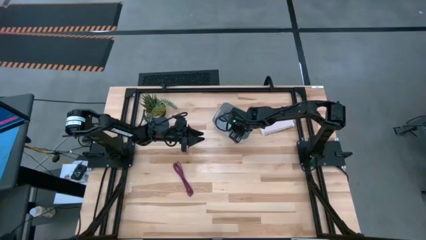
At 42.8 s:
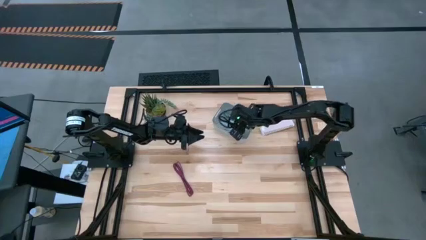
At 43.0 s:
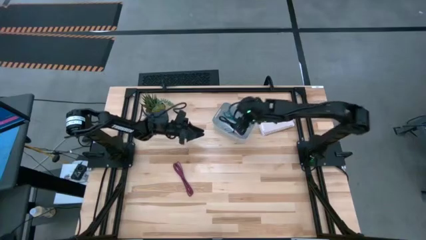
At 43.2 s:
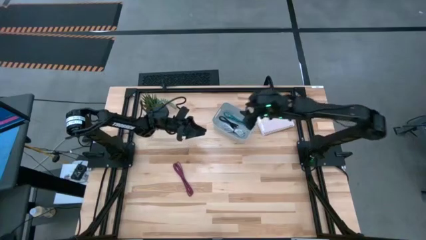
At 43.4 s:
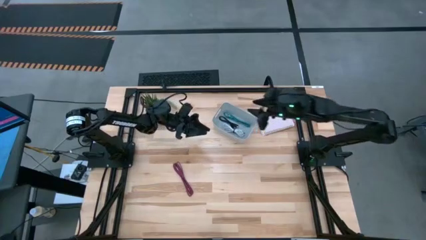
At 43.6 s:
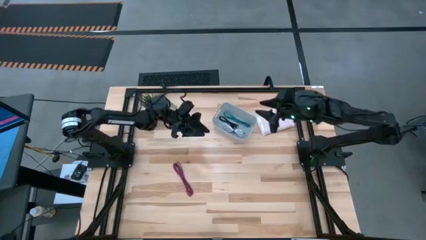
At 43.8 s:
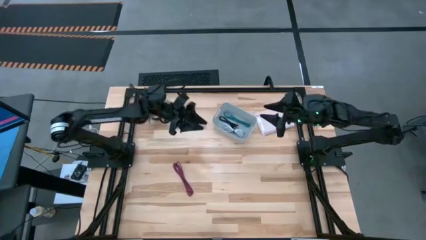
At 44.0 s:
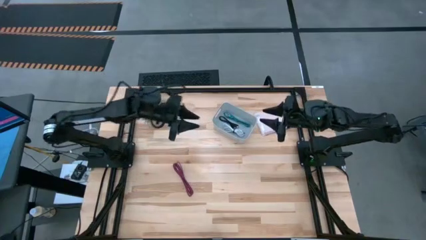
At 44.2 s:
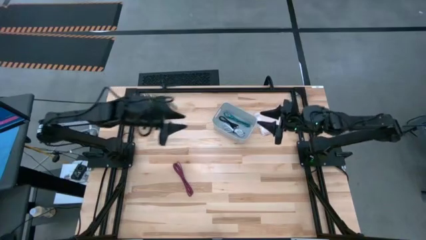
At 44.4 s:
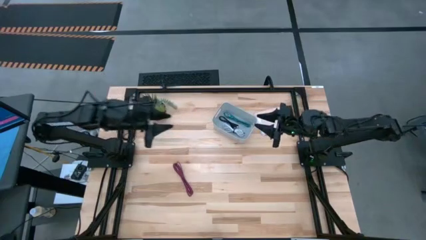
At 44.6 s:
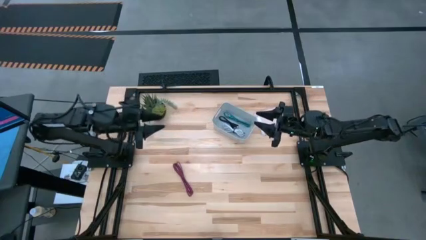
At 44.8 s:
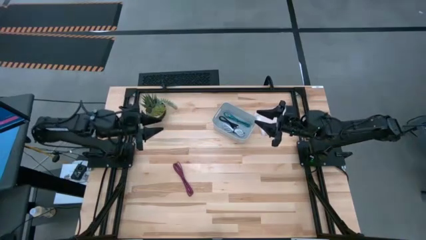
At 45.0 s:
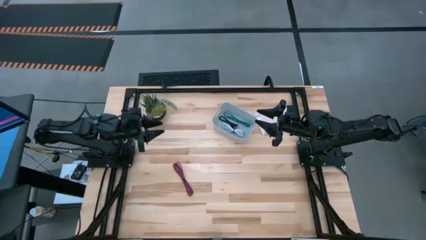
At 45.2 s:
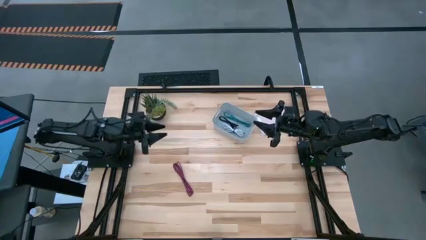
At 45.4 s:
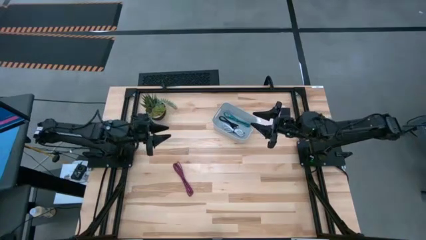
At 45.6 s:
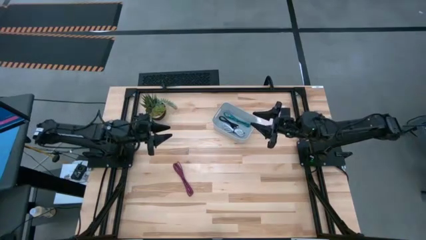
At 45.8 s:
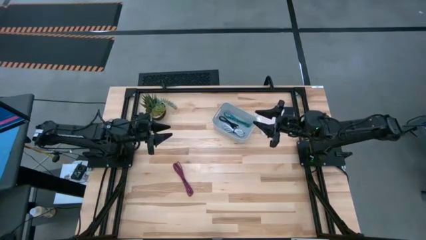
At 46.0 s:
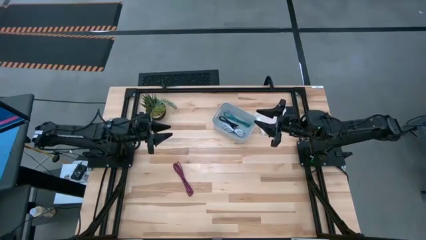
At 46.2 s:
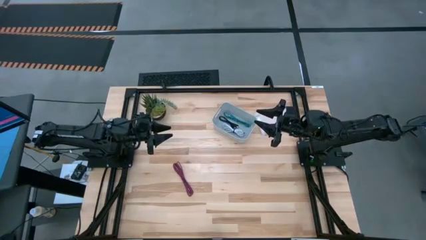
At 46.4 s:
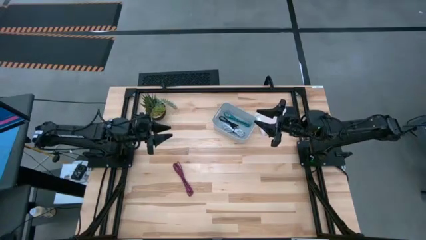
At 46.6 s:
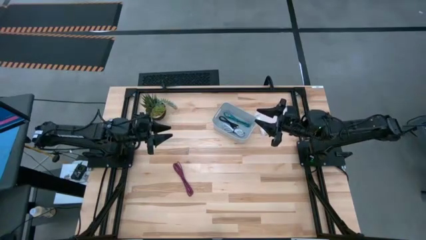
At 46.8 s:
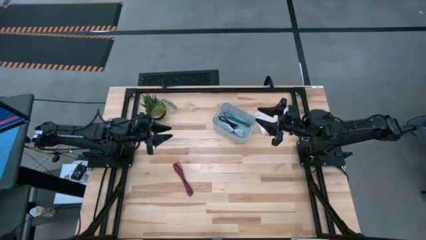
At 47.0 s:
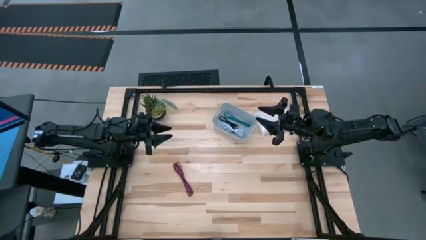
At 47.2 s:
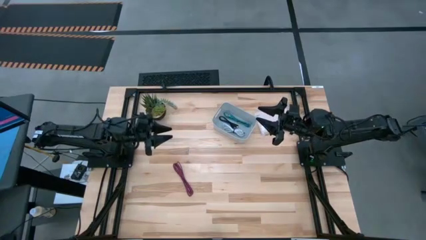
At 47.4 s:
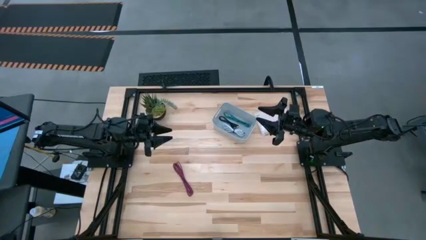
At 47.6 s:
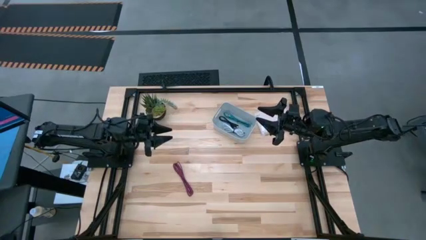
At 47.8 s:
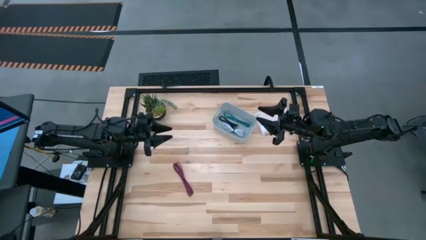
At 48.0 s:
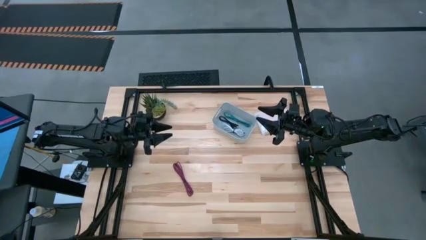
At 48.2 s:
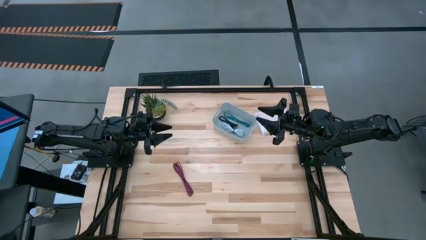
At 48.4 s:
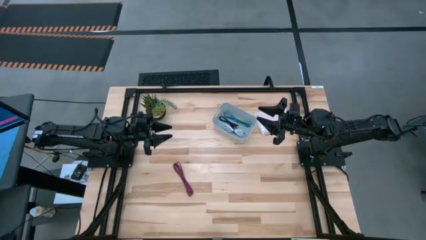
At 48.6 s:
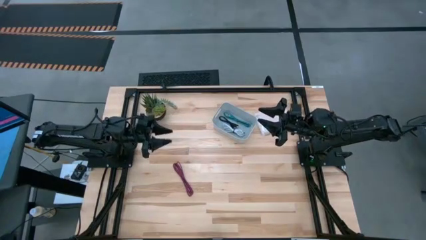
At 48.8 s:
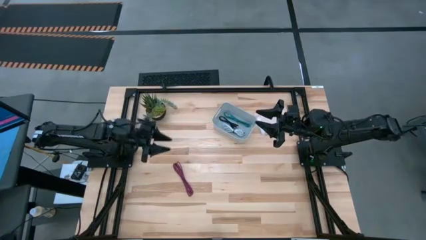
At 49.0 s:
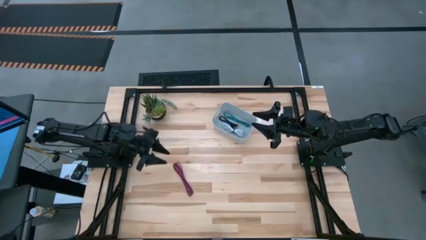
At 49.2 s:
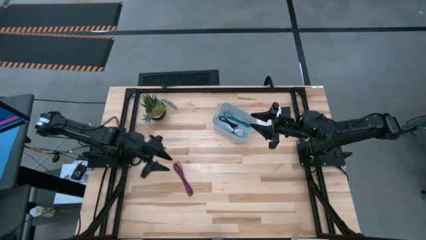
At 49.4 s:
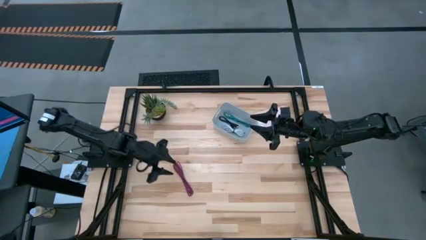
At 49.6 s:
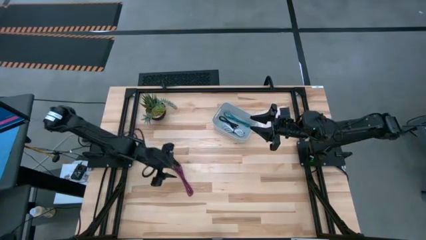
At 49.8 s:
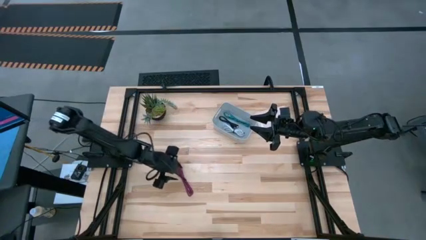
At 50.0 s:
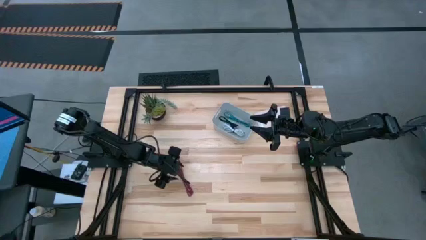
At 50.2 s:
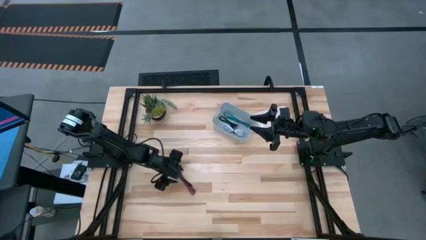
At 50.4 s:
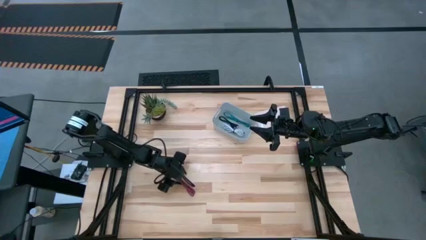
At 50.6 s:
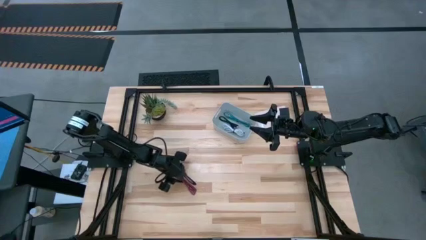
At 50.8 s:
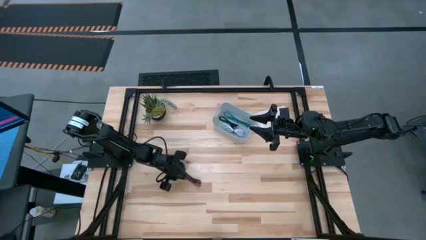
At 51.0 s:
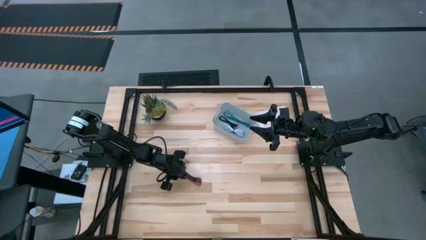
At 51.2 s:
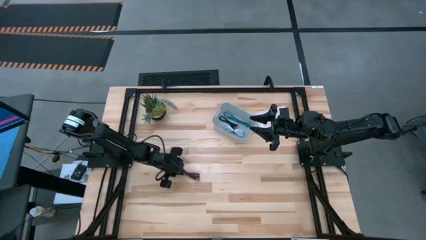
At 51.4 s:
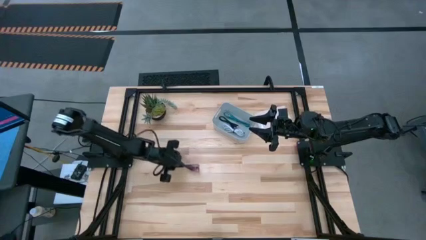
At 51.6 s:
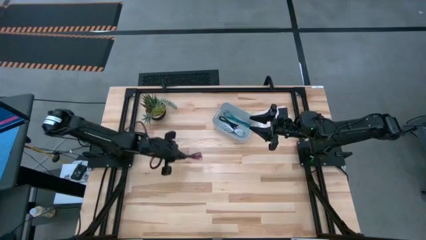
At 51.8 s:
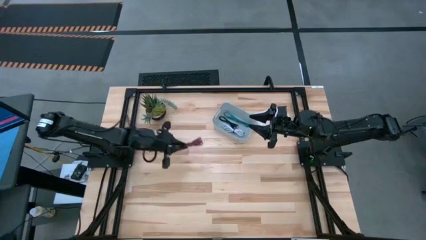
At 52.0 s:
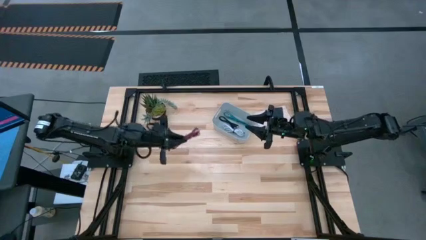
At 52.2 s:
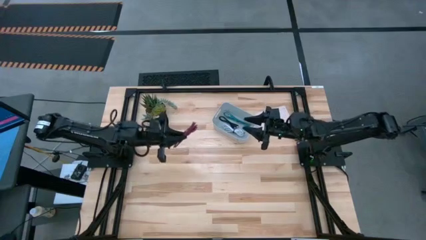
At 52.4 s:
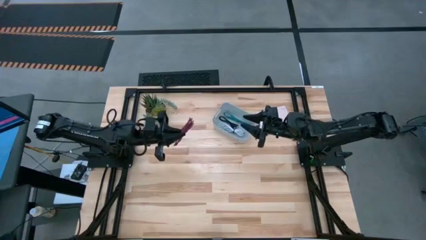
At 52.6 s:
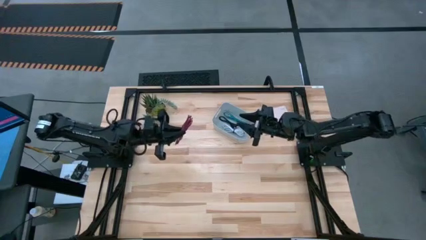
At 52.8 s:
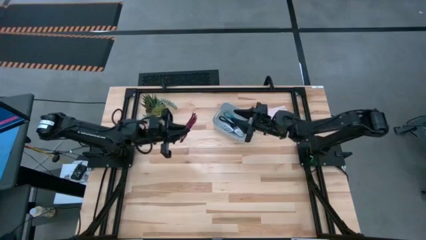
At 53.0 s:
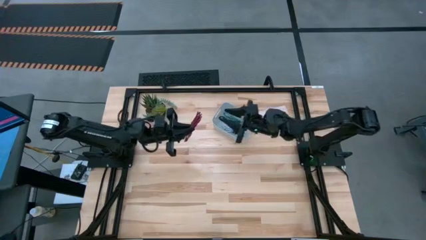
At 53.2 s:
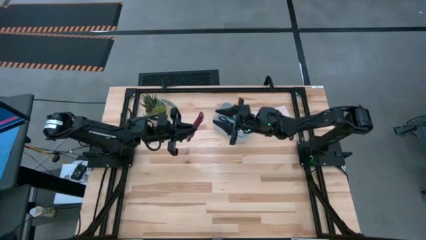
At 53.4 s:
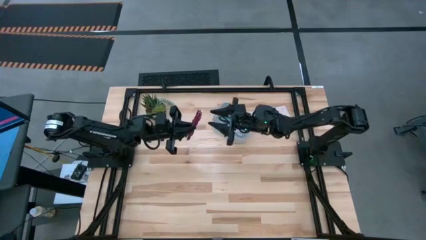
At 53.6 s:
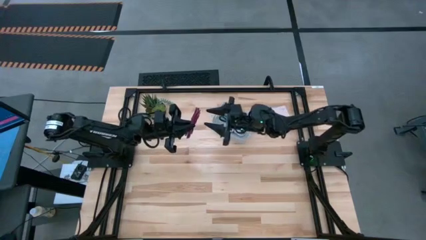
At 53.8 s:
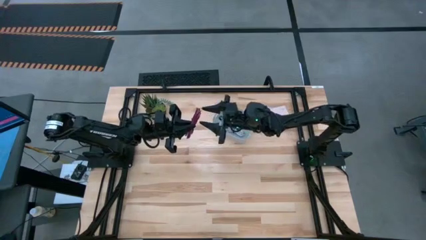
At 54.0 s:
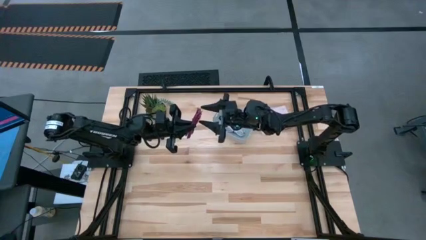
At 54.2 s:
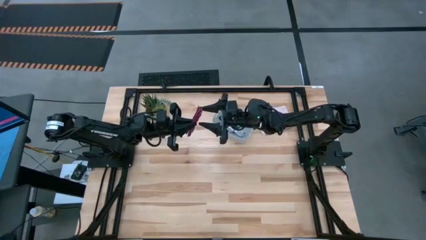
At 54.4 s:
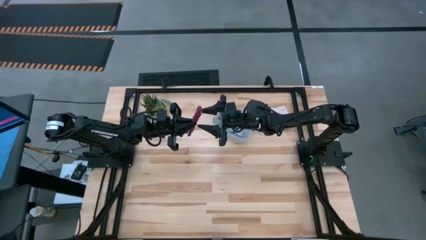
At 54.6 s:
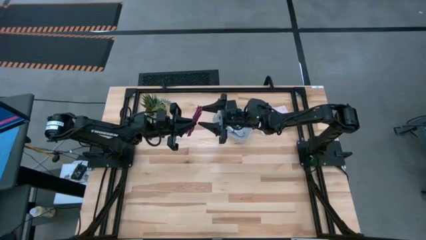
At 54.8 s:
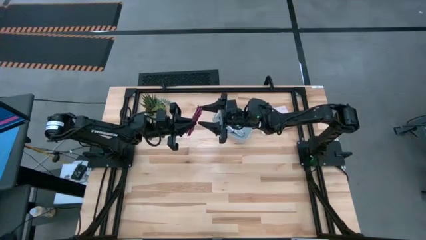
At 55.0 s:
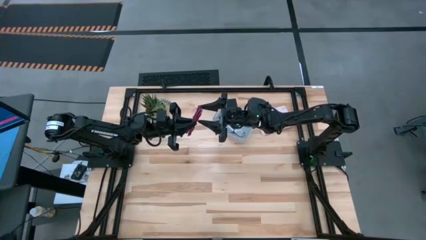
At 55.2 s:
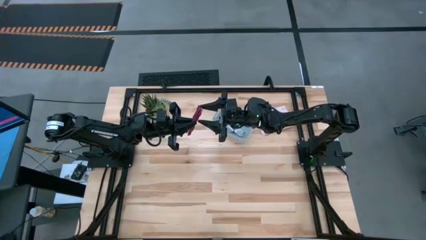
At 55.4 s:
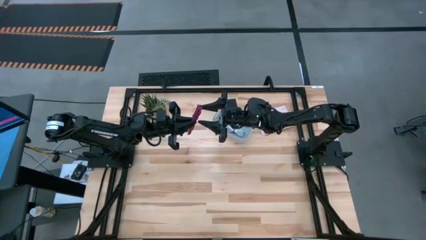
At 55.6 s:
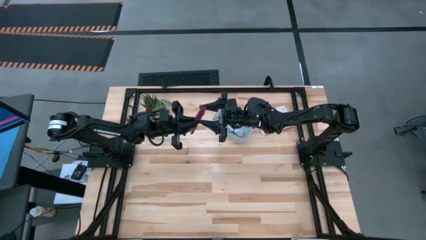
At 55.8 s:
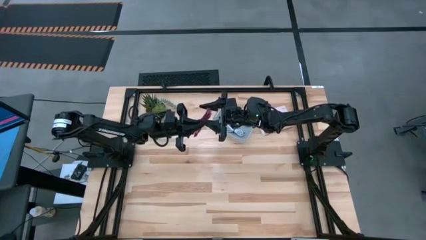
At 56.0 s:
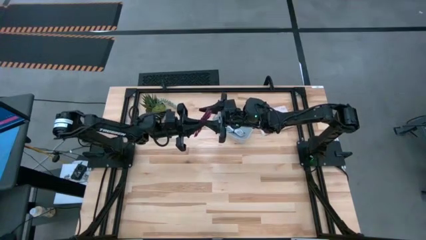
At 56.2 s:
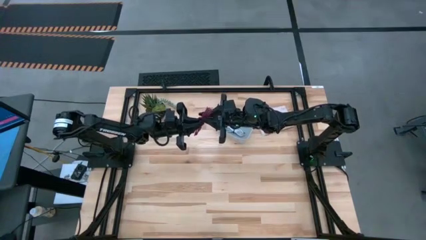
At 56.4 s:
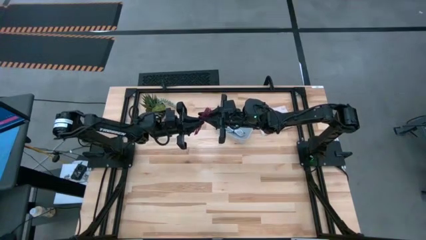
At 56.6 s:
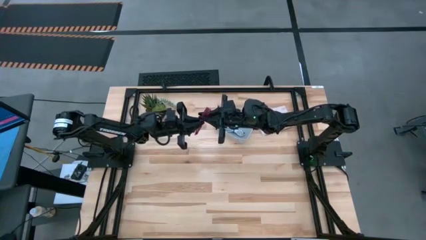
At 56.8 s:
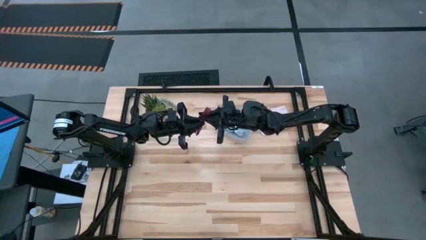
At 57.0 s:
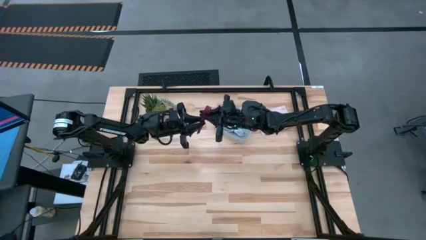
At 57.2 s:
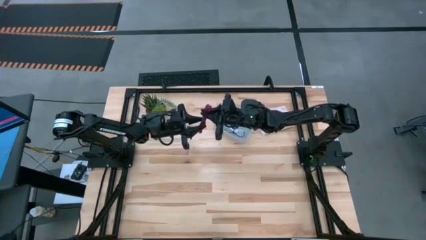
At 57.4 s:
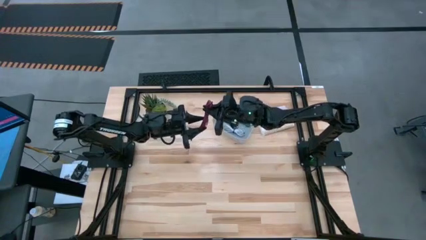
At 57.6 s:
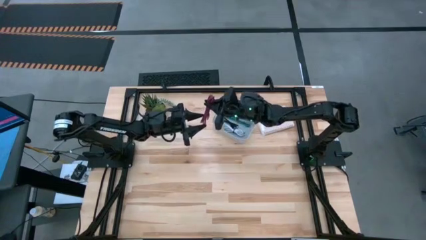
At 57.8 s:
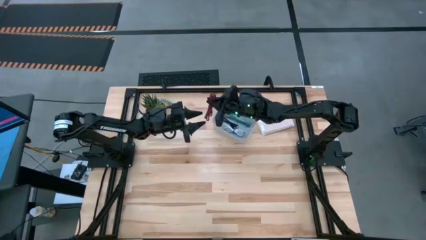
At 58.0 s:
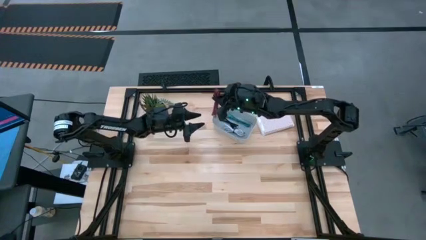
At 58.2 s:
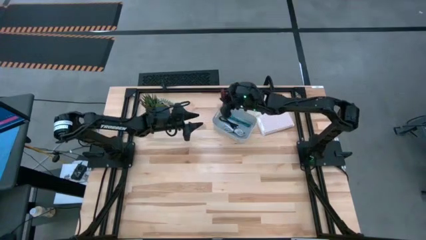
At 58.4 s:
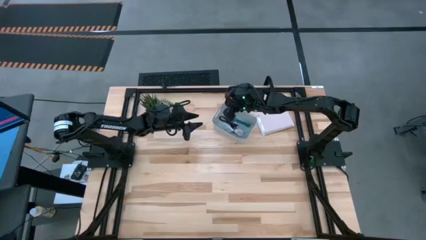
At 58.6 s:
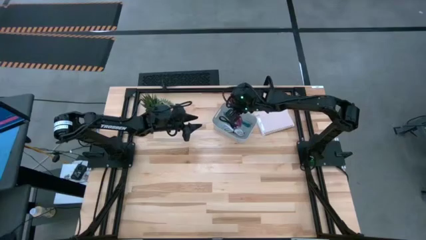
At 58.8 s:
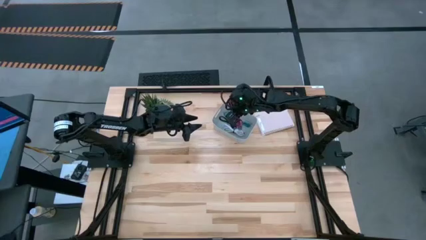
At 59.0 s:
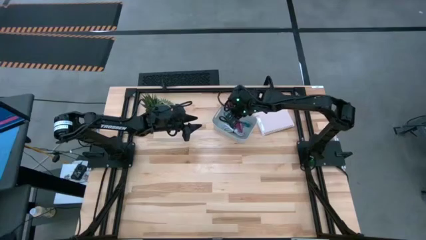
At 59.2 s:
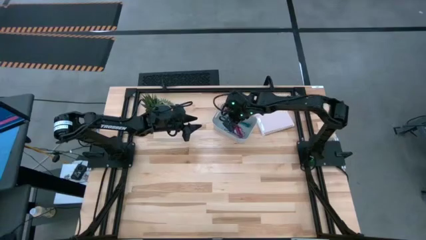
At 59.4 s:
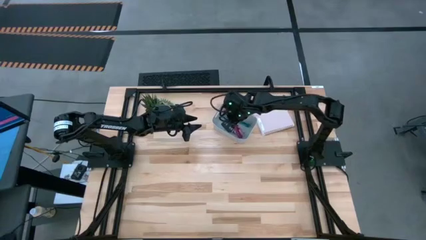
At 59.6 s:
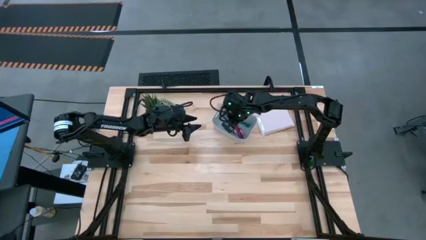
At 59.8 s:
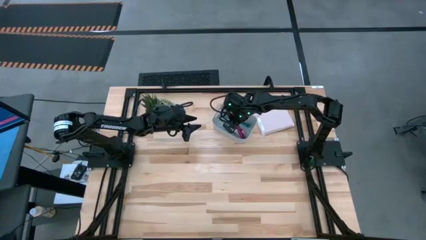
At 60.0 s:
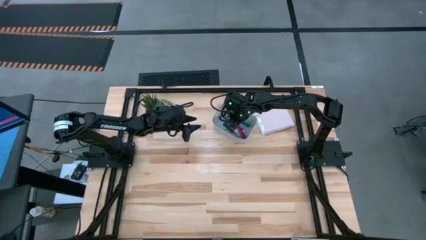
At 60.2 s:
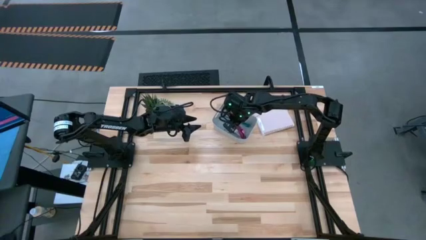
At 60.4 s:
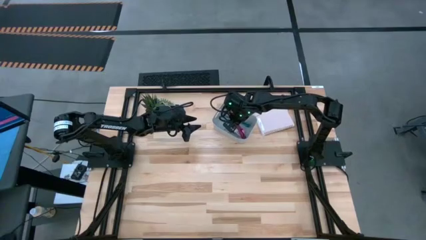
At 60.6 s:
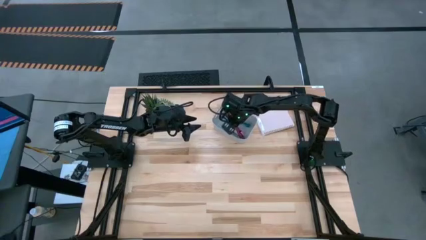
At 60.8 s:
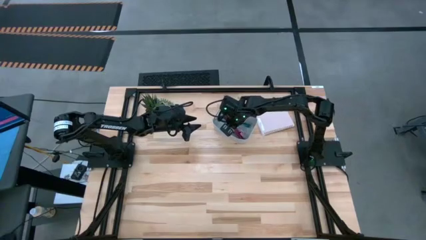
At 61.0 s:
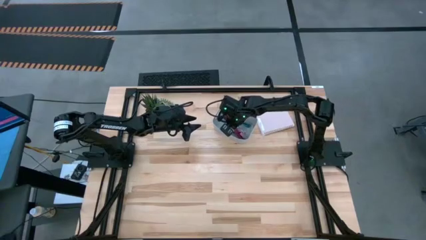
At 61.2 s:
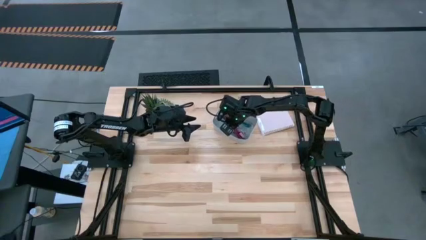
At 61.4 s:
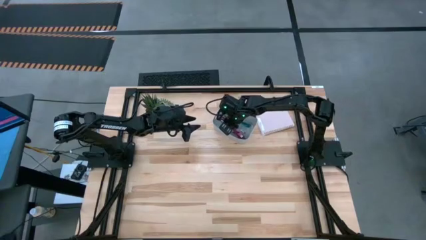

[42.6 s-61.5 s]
Task: Pick and place USB-C Cables
Put the red USB cable into the grey bin
